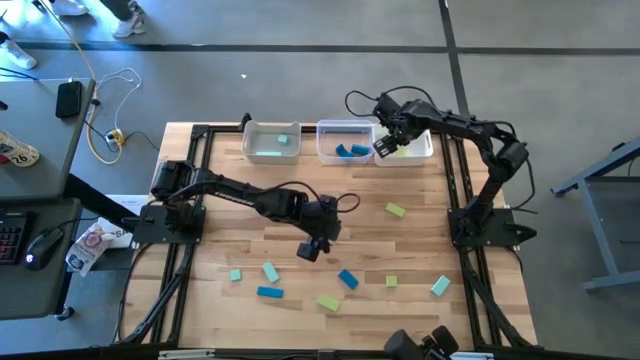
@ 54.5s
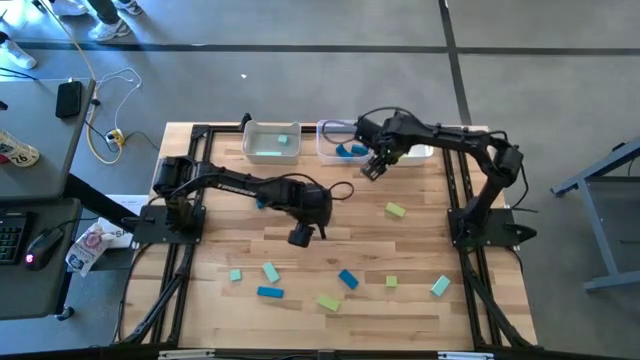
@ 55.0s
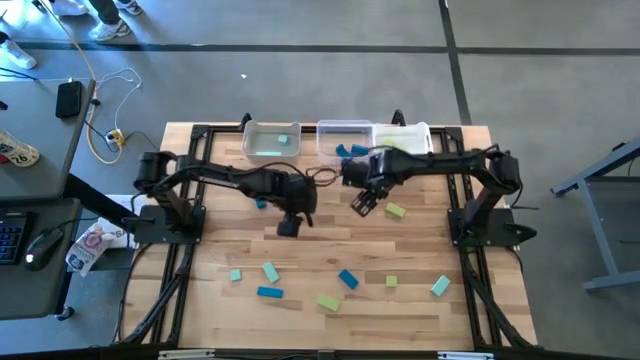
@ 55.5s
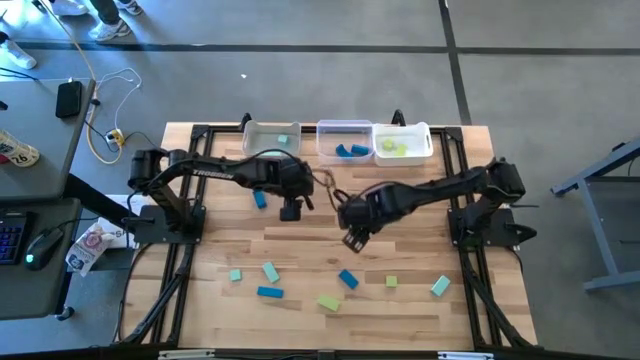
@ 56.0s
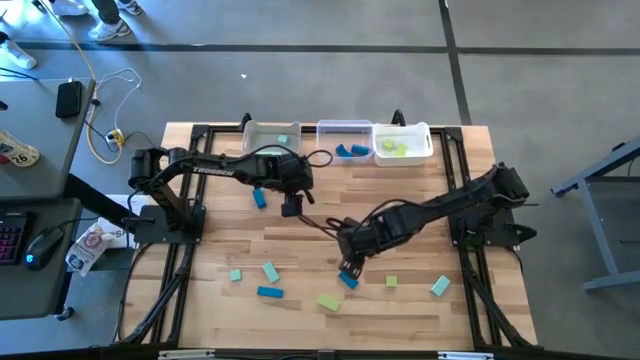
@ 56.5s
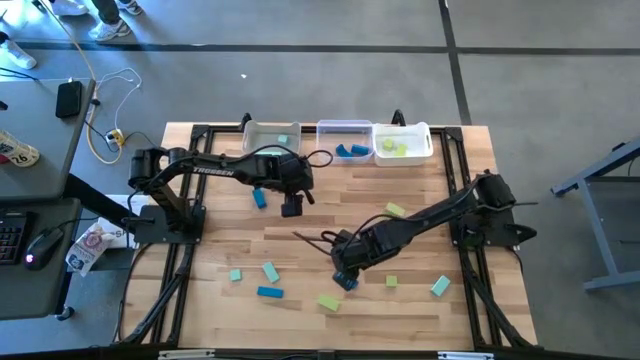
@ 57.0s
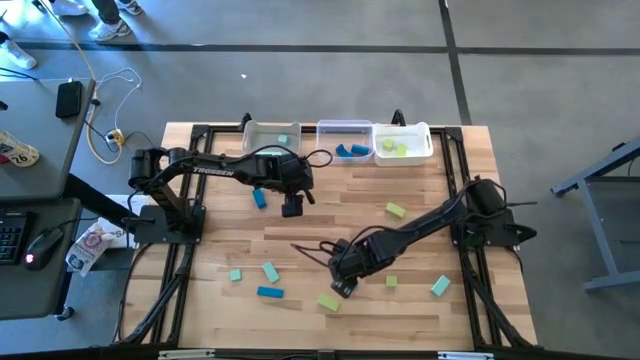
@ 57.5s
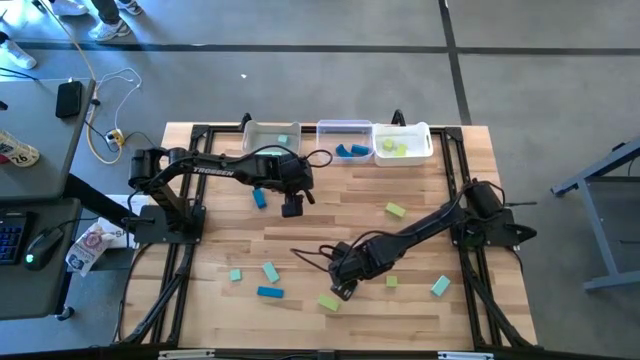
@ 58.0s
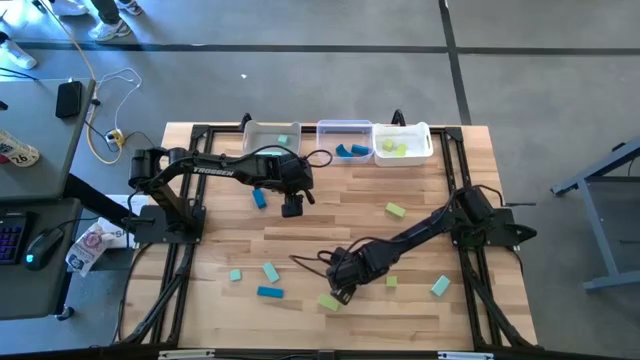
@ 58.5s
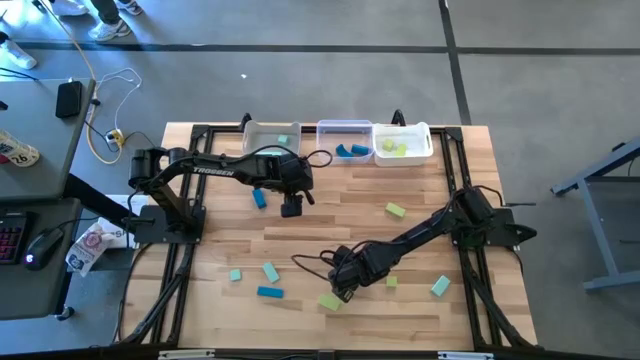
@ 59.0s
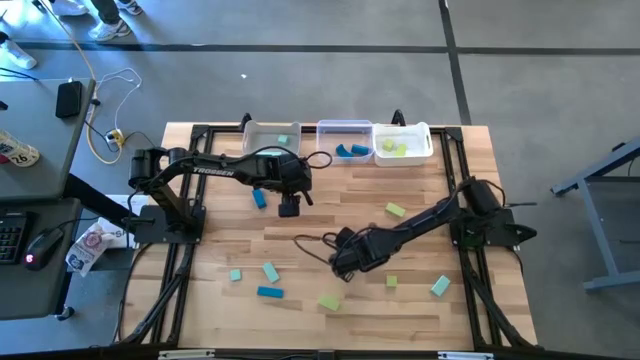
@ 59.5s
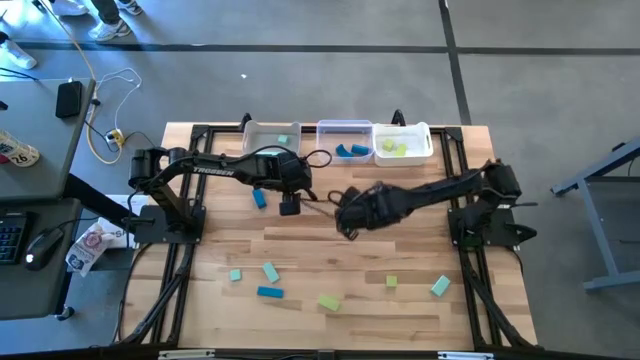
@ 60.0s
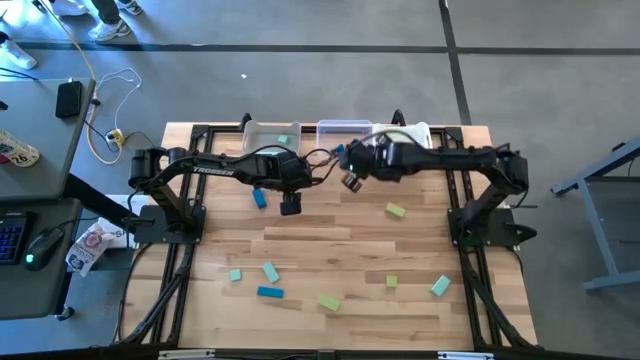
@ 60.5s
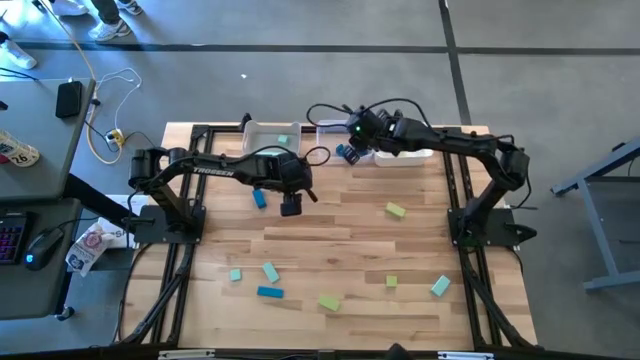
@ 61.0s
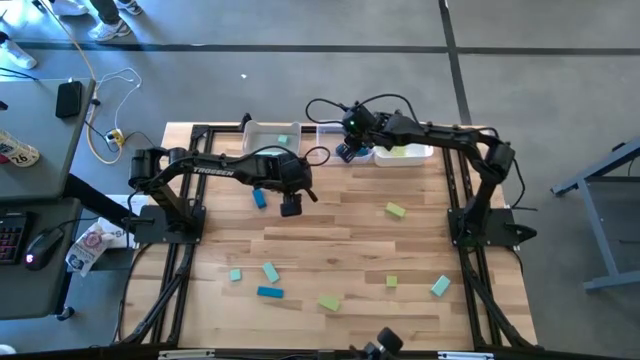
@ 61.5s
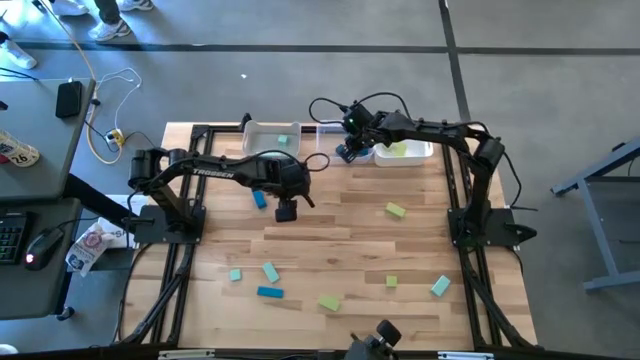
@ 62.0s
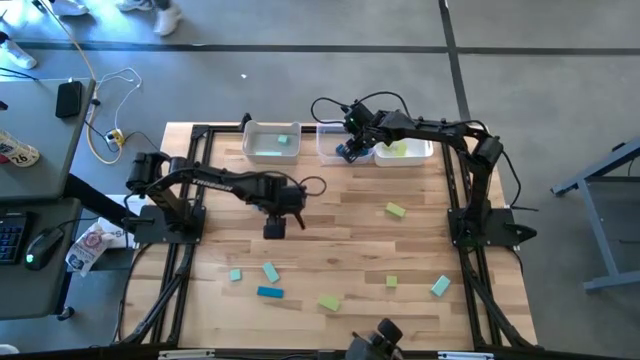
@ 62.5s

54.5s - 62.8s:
Task: Sort & place blocks by color
Put the blue block into the transparent bin

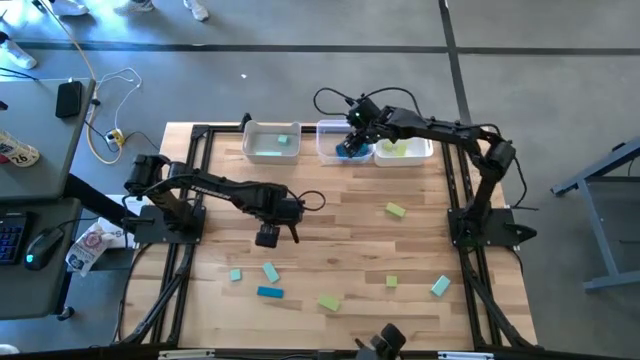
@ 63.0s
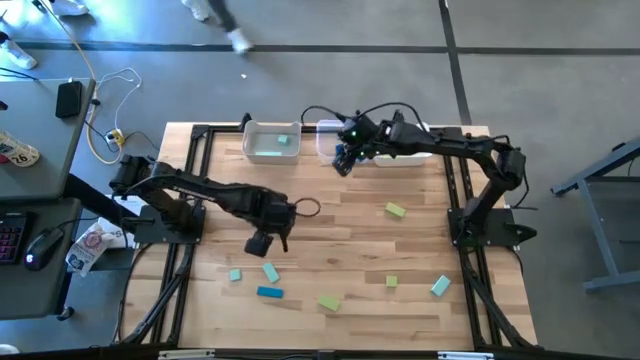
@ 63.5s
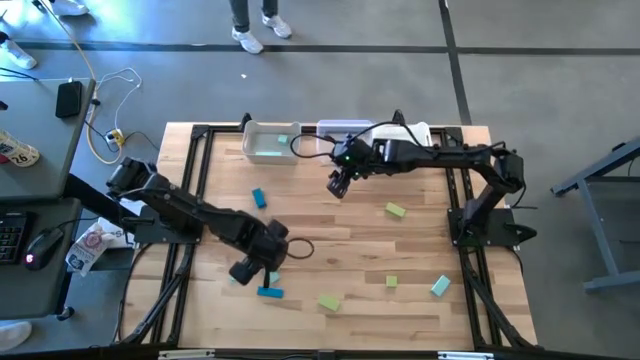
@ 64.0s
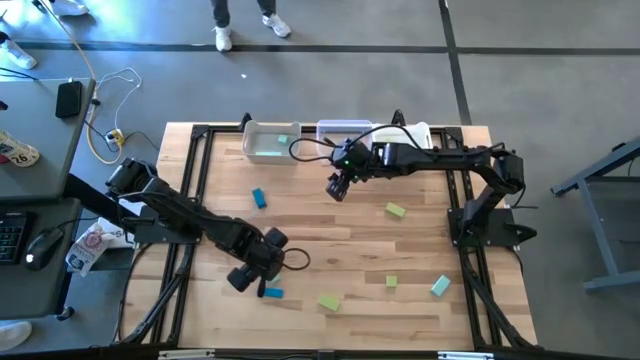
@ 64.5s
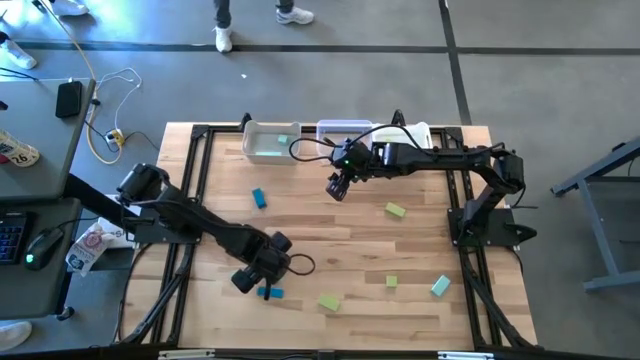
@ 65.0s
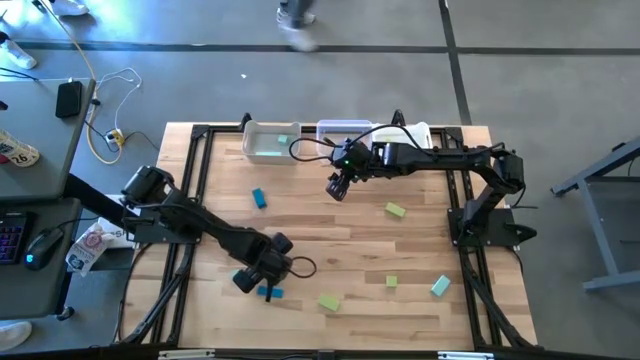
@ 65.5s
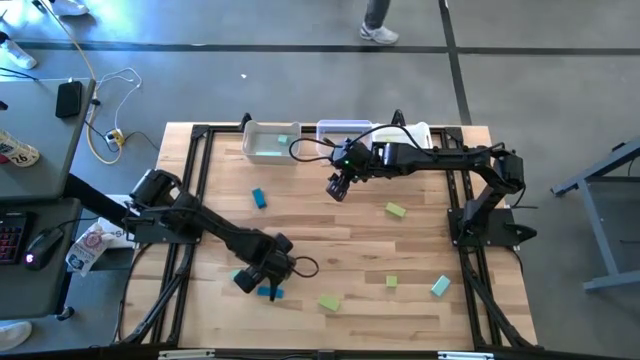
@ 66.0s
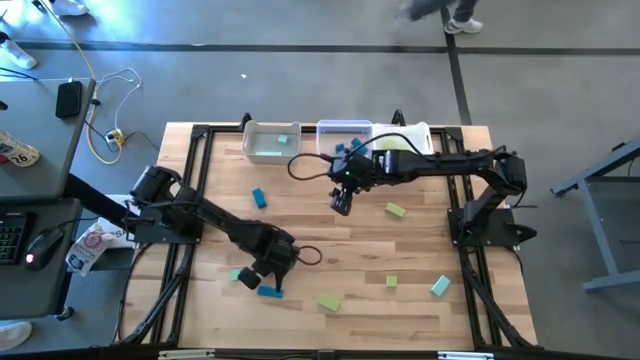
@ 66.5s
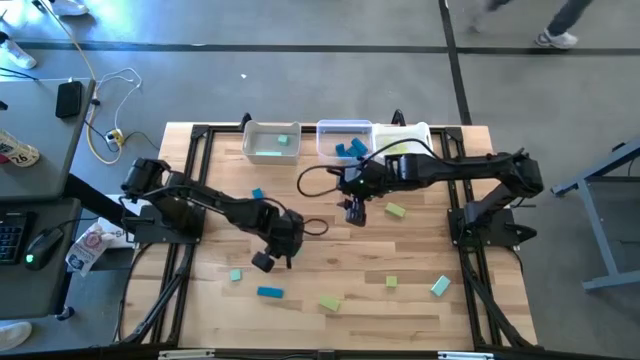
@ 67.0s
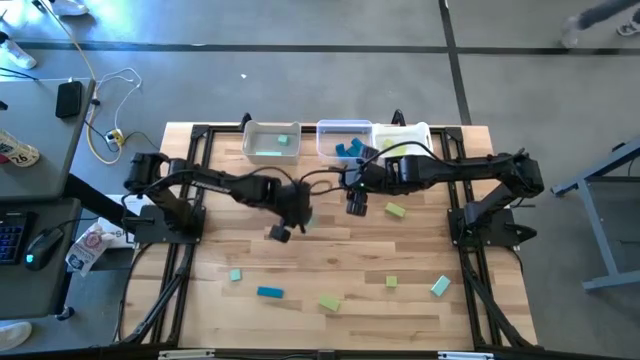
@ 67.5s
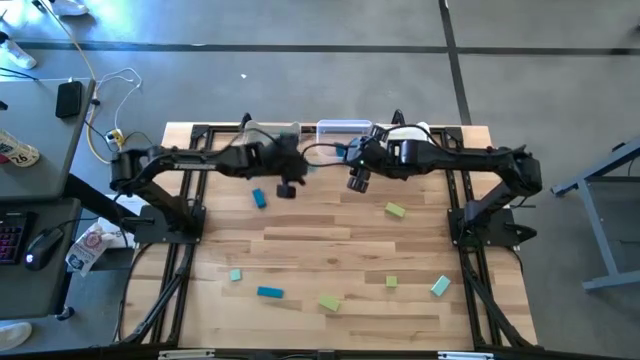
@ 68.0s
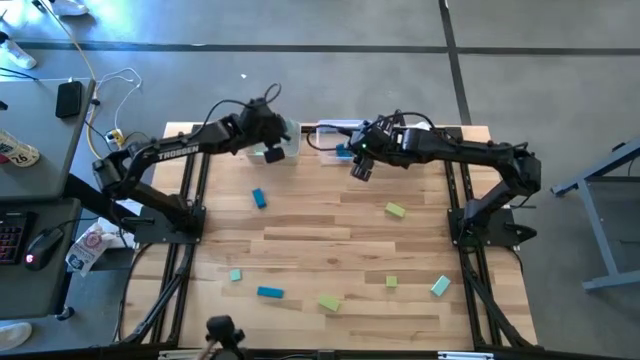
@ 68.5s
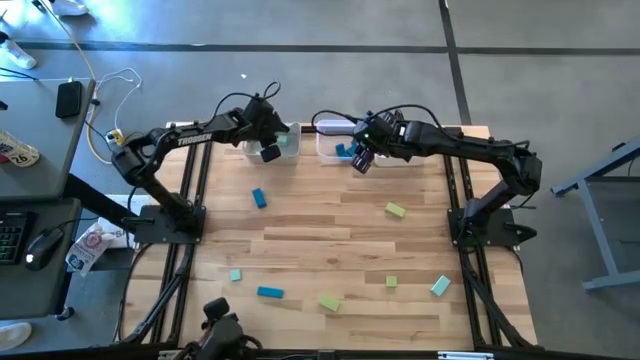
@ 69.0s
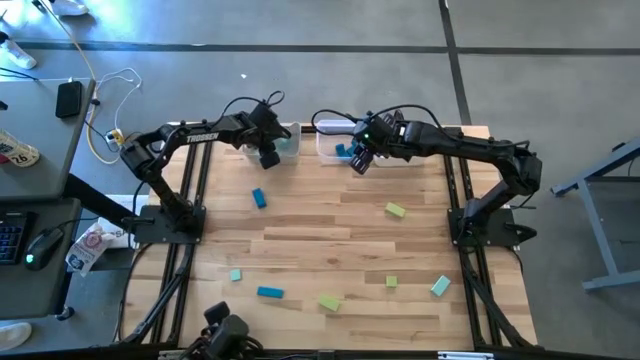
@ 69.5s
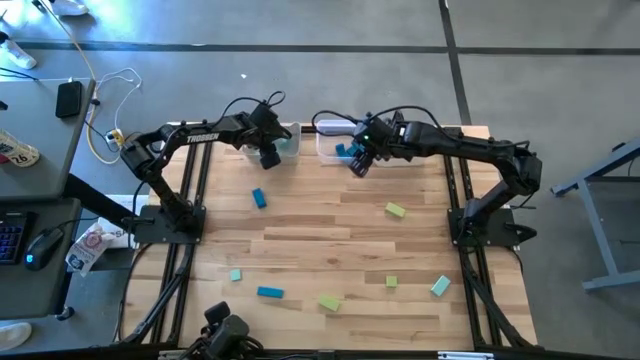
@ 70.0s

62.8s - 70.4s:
Put the light blue block into the gray bin

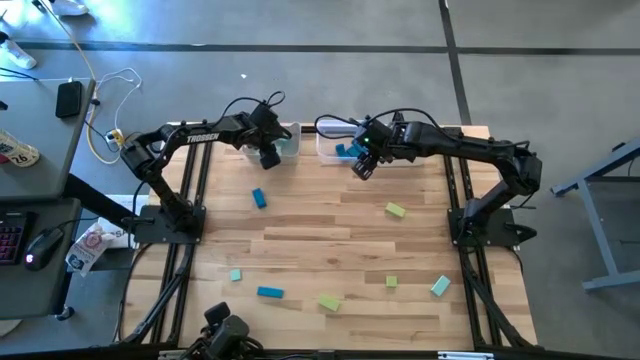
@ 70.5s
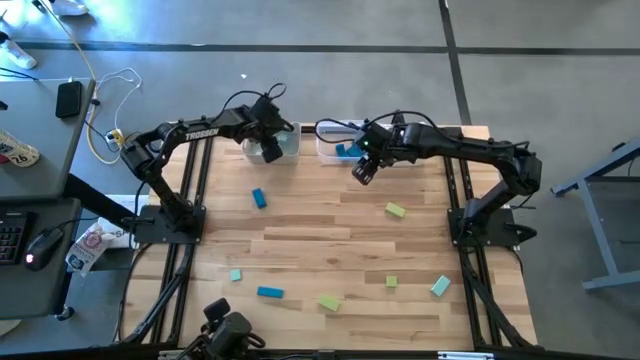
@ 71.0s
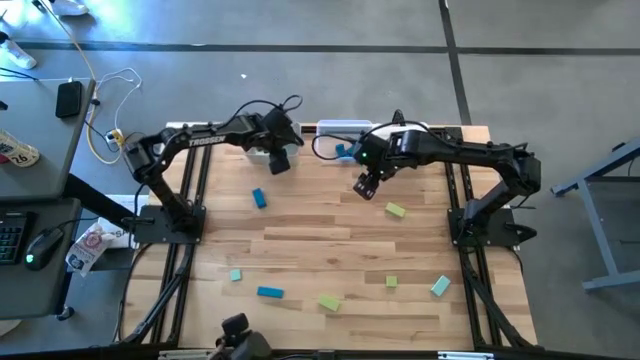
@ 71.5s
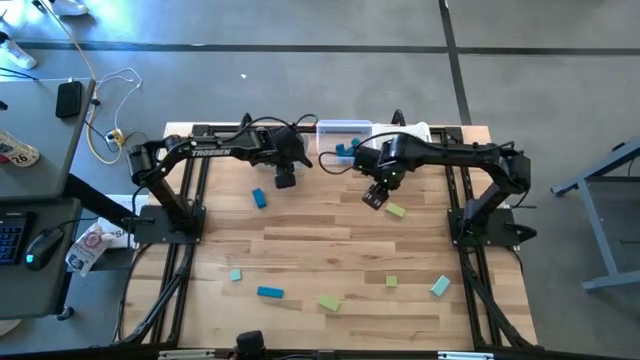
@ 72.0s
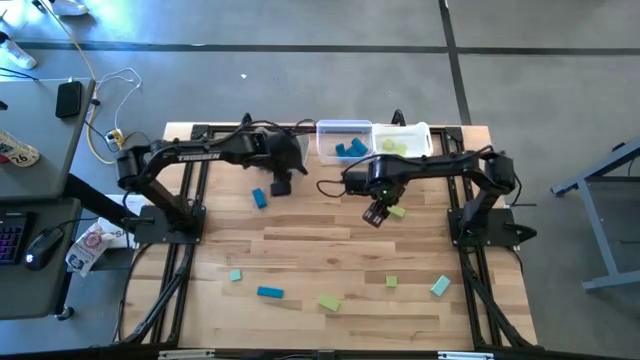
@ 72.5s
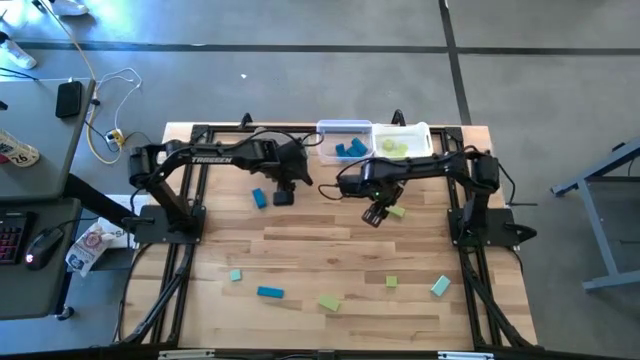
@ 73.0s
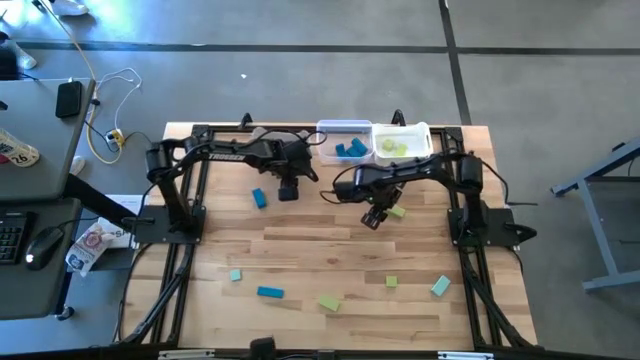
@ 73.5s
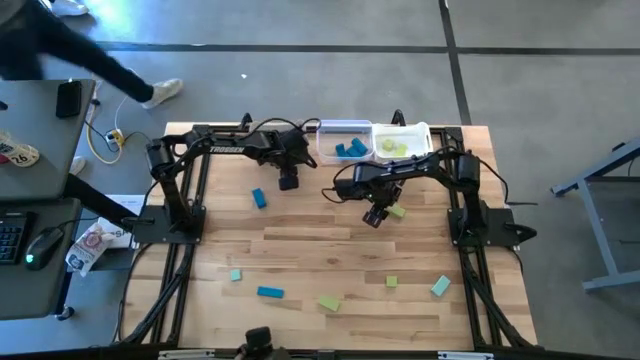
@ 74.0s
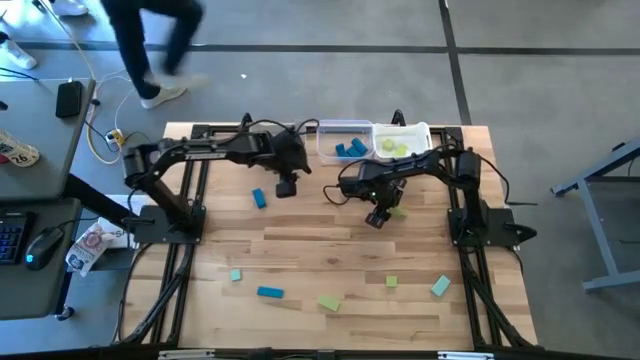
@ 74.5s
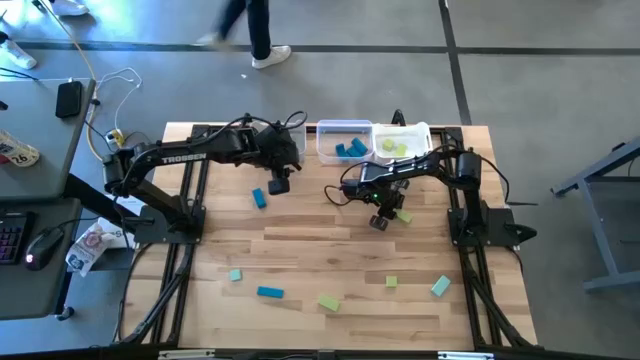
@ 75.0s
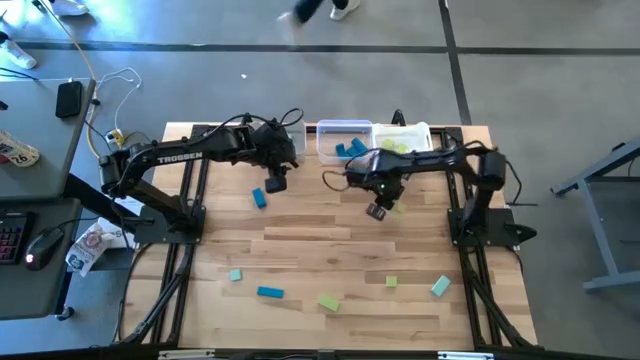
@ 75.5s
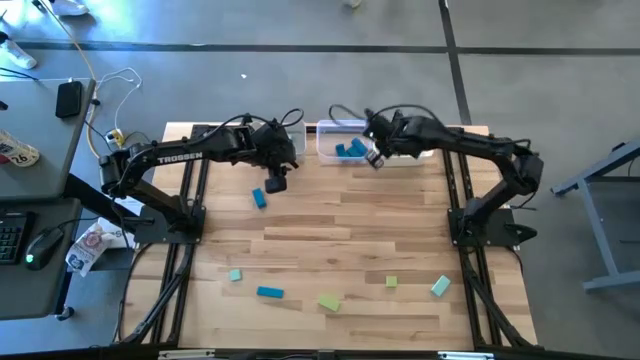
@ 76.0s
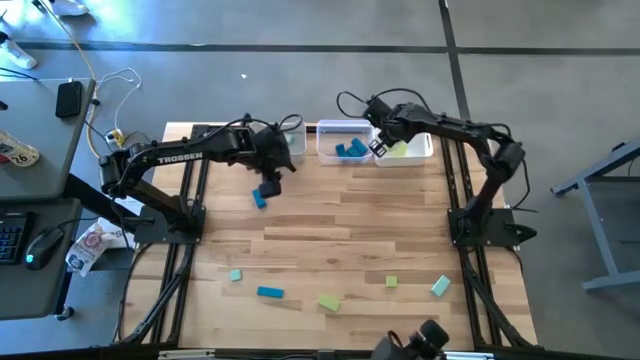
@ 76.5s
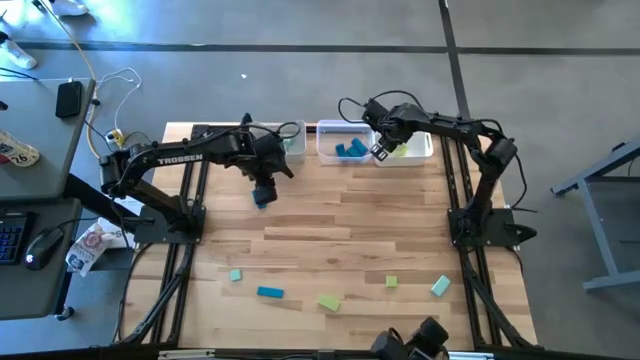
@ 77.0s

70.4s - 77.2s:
Put the green block into the white bin
